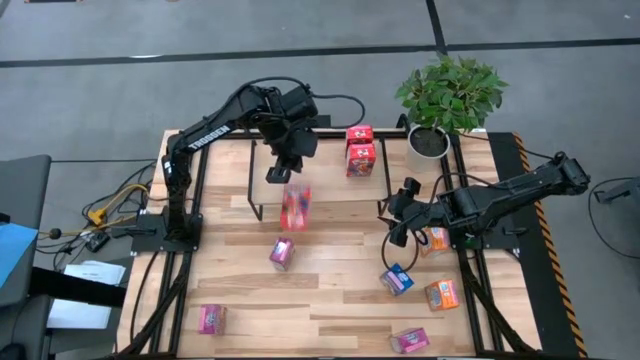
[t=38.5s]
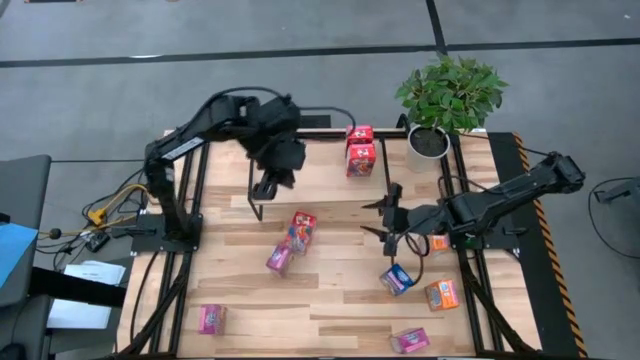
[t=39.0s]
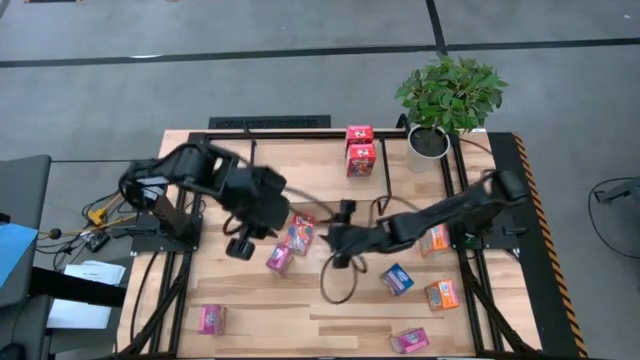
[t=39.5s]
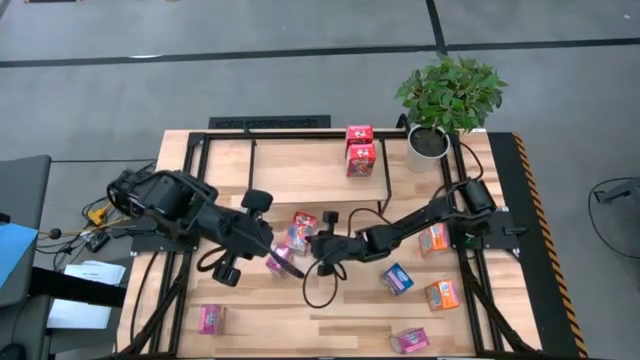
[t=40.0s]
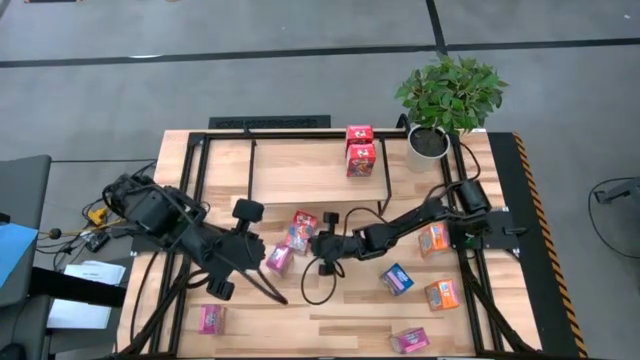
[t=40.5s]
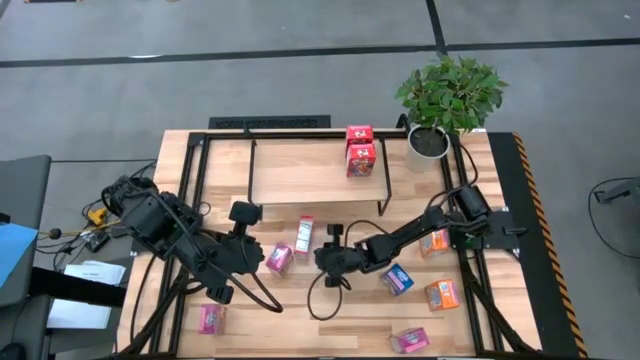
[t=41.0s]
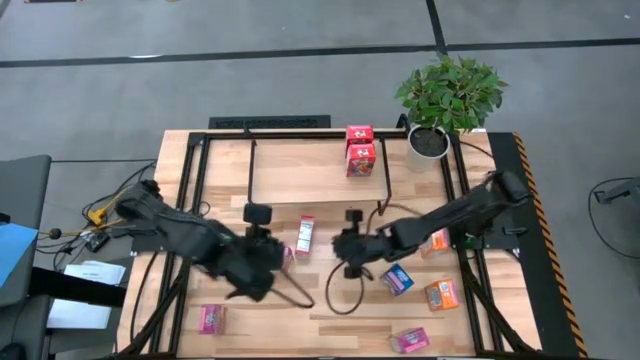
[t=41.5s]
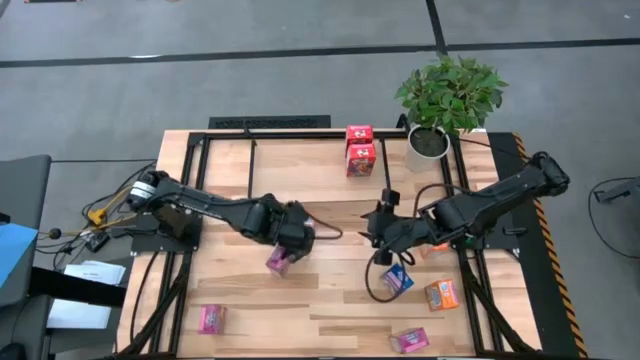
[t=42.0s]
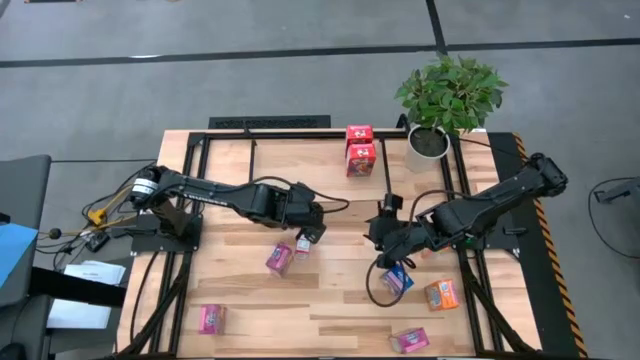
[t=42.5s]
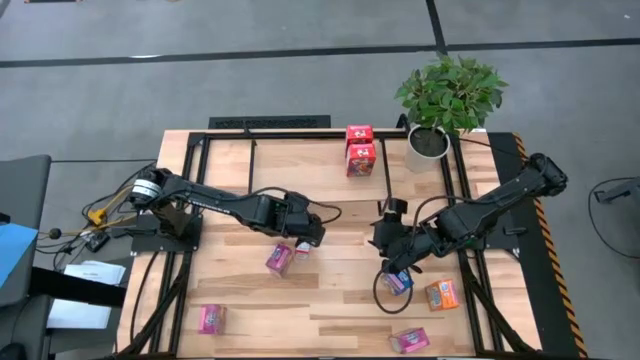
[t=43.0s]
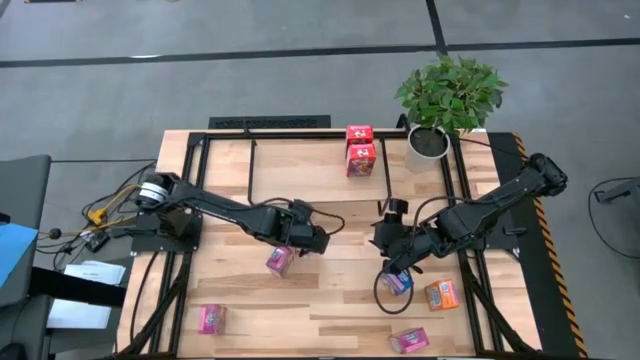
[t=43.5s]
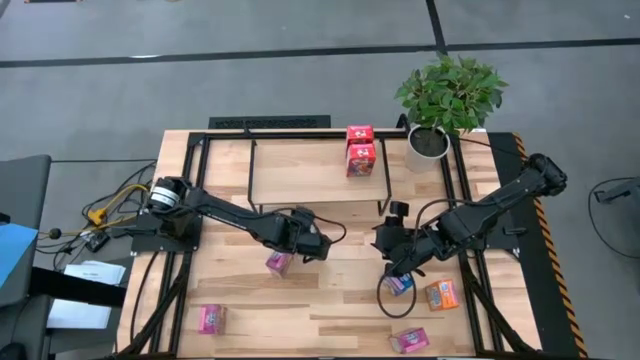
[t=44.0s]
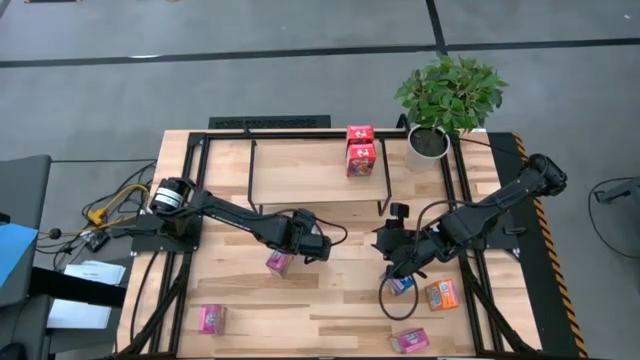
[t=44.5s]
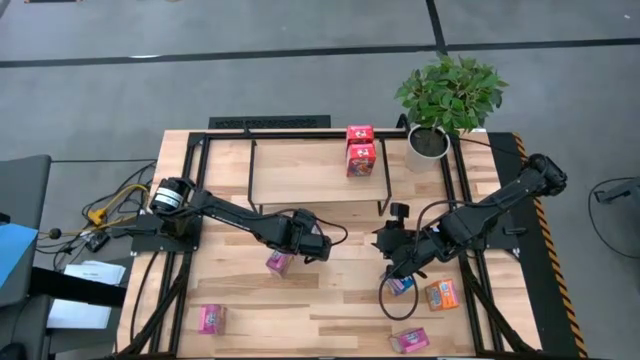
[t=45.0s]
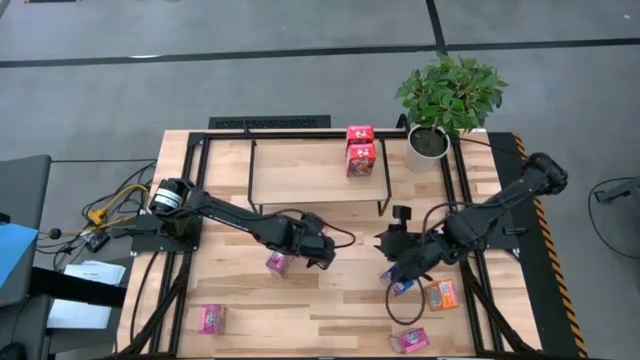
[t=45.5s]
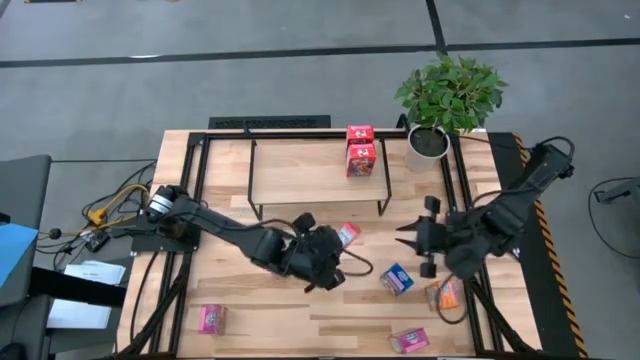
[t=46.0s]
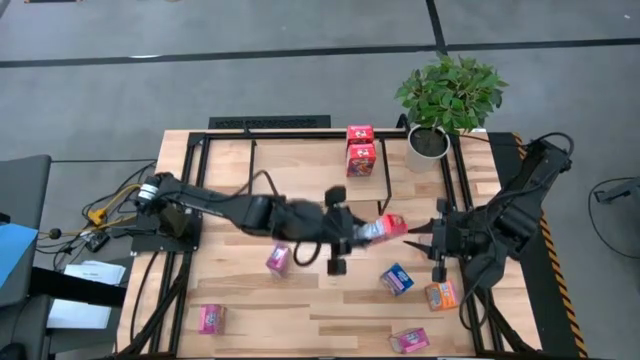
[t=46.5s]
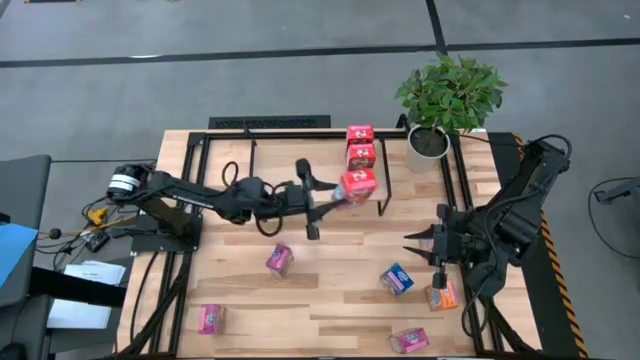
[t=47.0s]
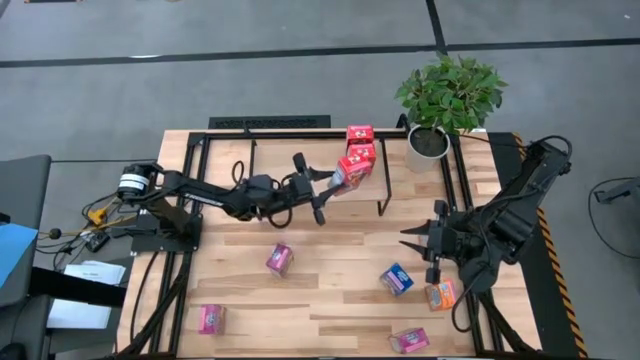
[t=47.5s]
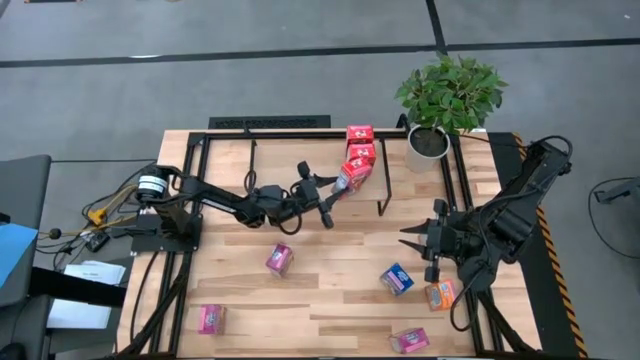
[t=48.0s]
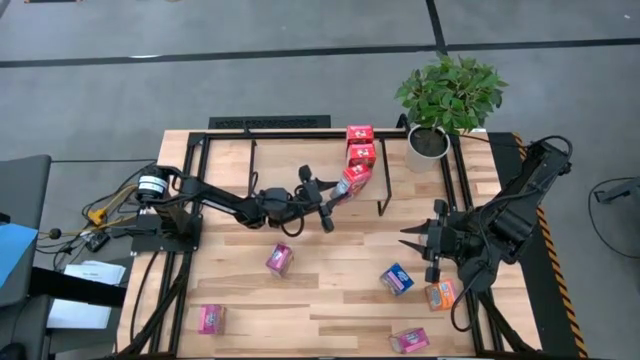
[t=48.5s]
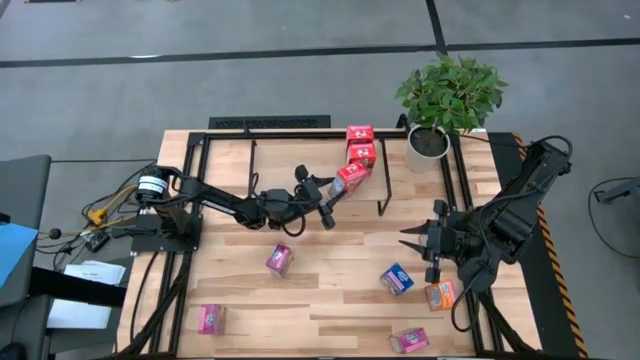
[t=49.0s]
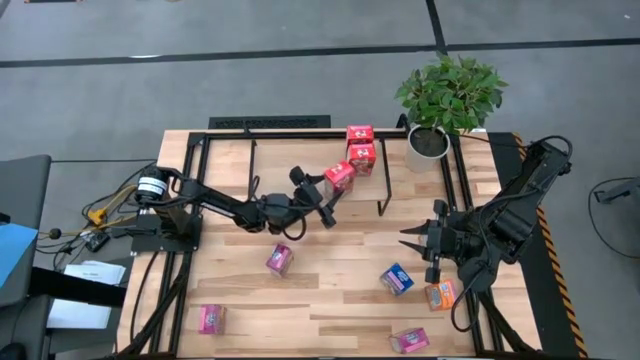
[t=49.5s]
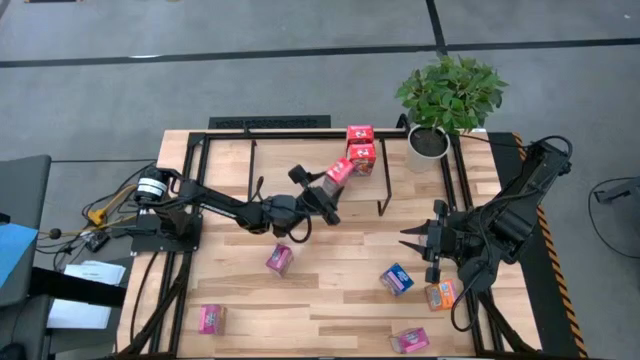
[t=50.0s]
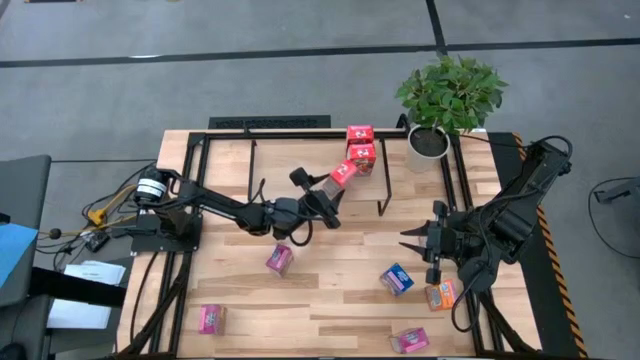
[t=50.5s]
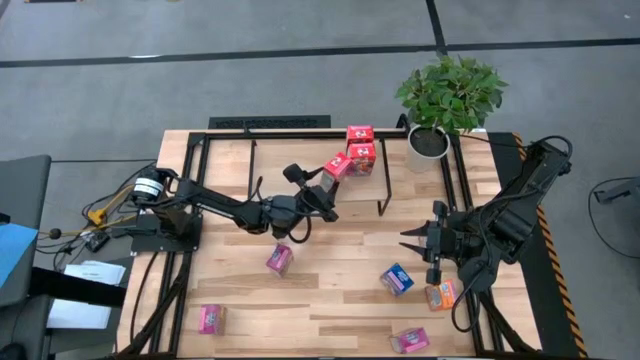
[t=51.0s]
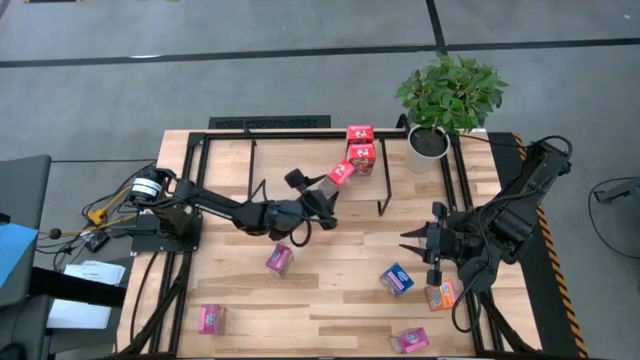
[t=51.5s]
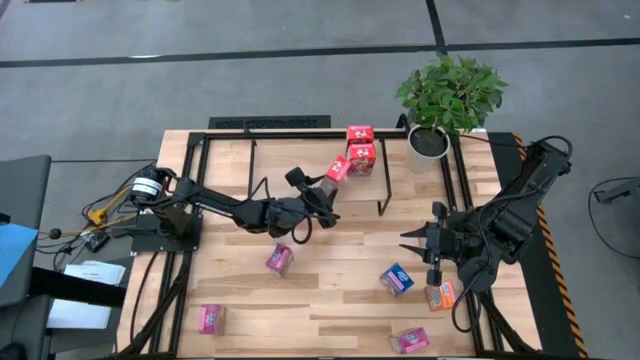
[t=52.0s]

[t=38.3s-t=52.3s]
Task: Stack cereal on shelf
Put the red cereal box on the shelf aligned with the other red cereal boxes

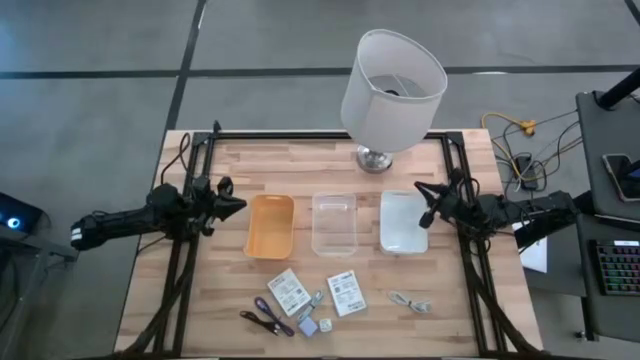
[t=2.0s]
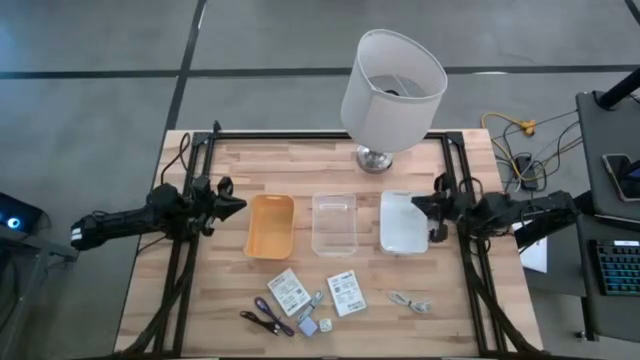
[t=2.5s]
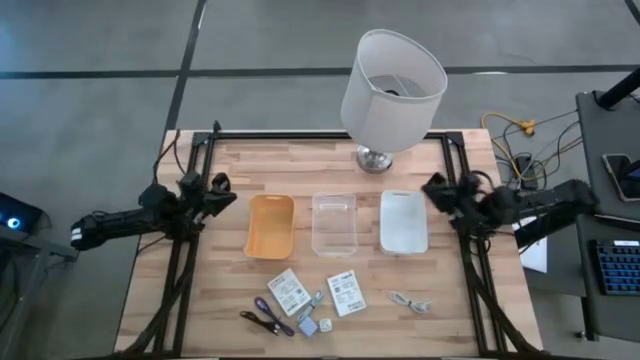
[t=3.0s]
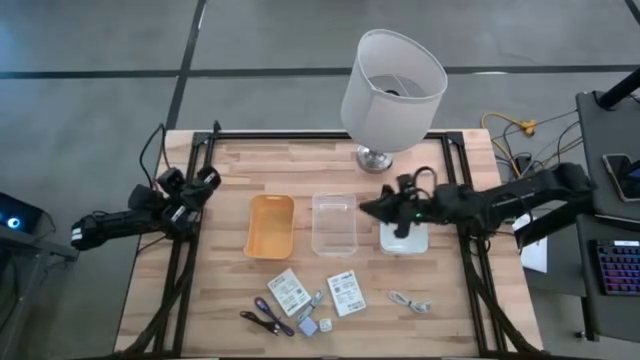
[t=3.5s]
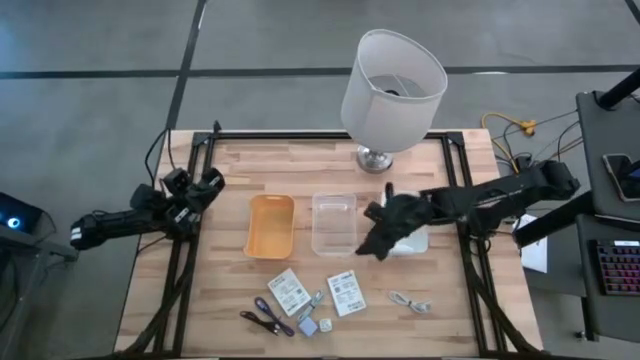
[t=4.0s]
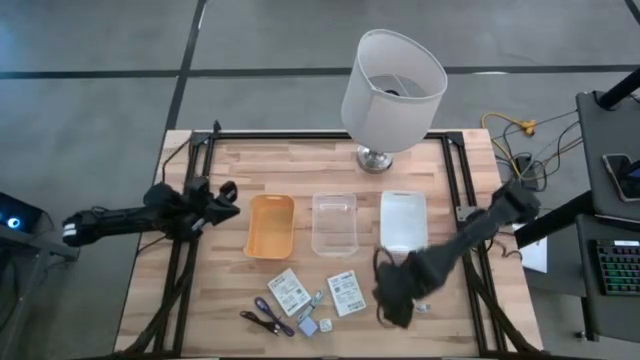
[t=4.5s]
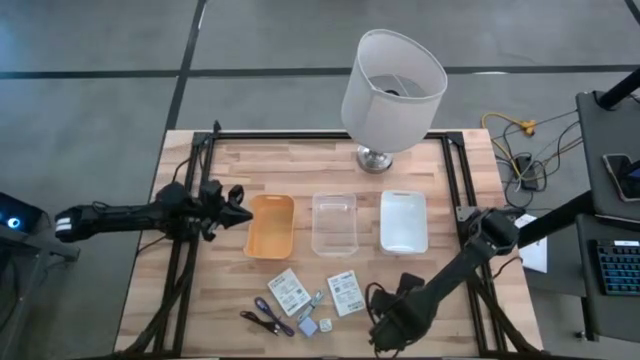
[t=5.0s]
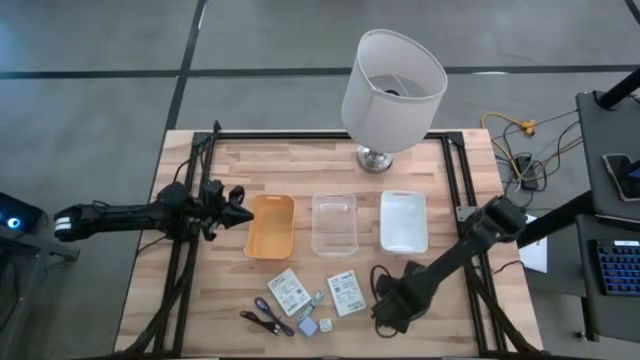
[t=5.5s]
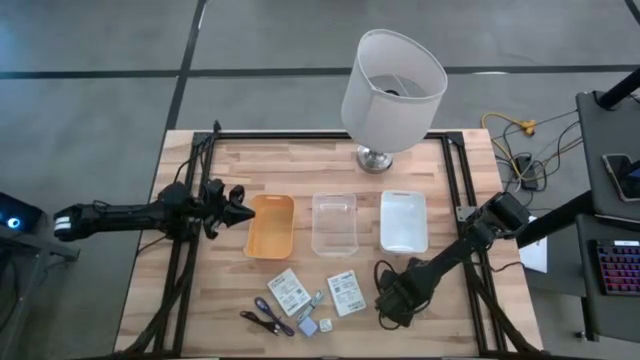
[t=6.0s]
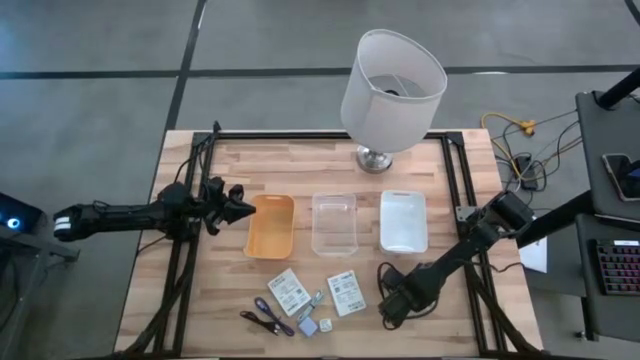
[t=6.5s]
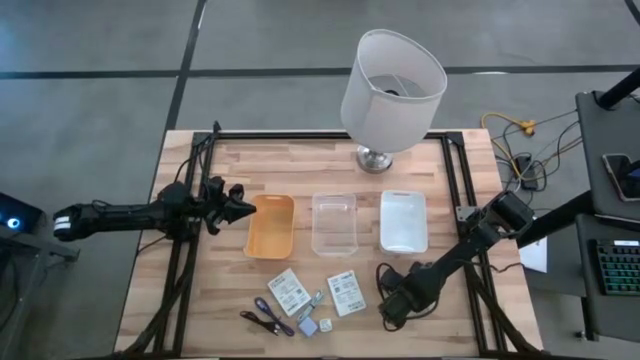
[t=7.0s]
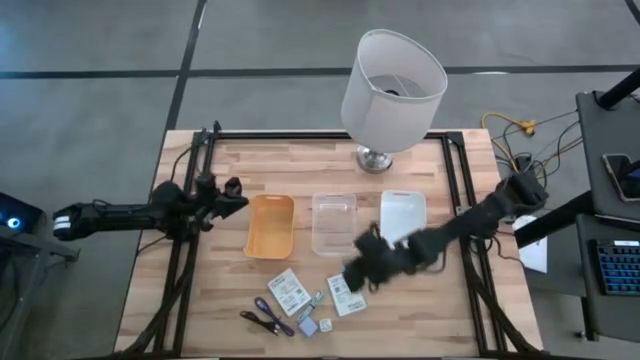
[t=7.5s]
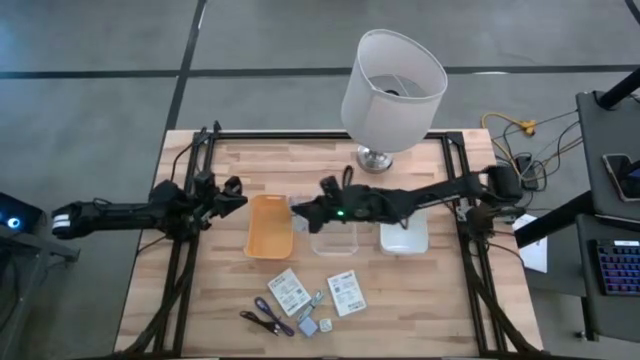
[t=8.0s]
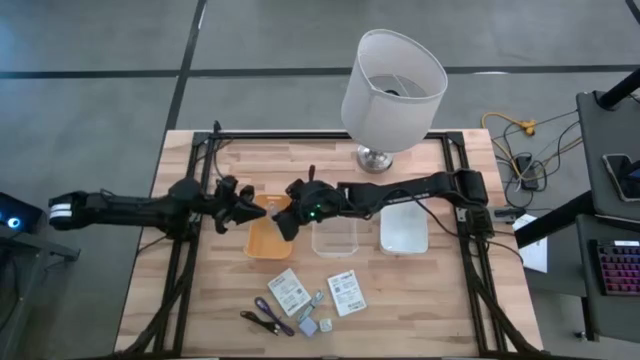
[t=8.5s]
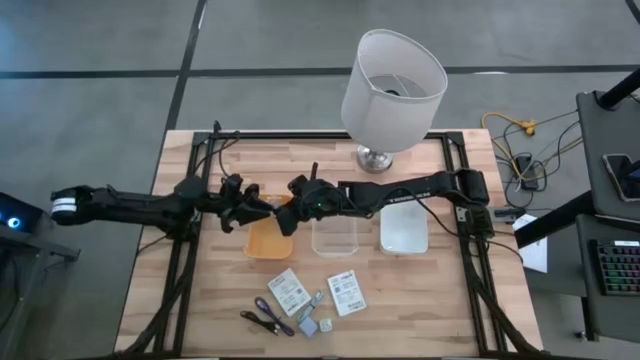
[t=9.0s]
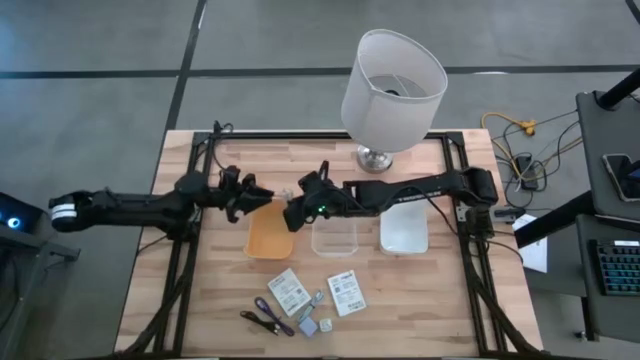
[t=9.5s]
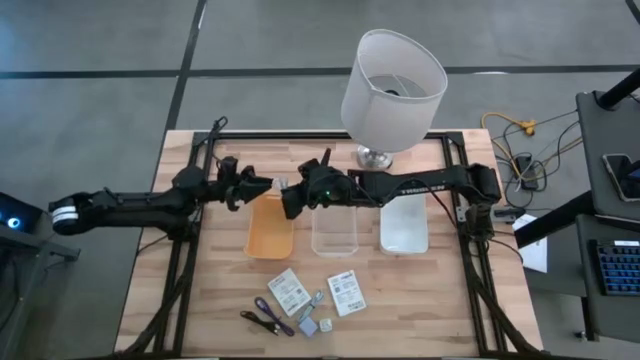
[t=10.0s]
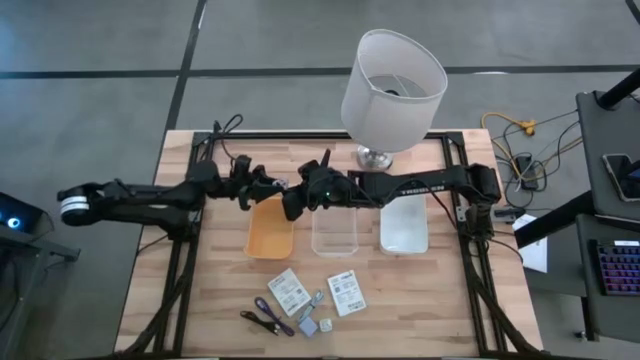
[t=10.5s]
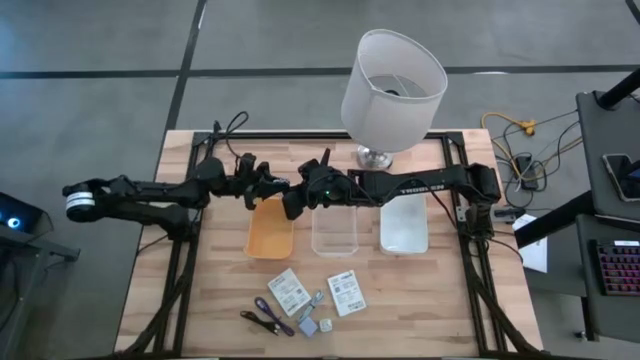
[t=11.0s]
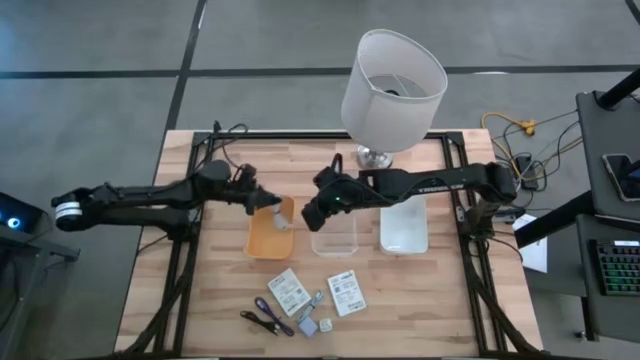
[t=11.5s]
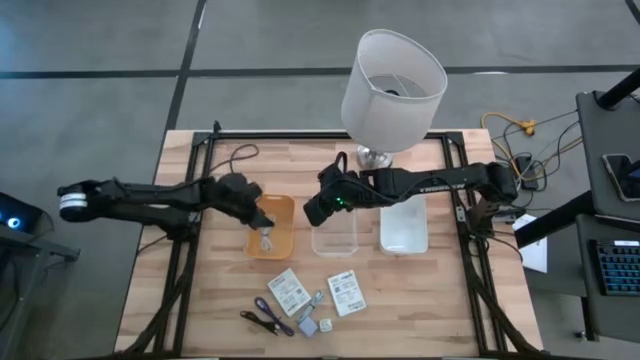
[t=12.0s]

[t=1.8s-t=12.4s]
Task: Pick and place items into bin
Put the white charger cable into the yellow bin
